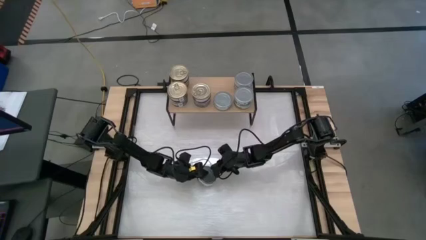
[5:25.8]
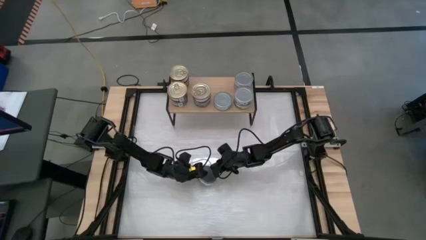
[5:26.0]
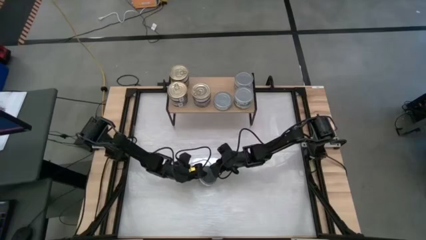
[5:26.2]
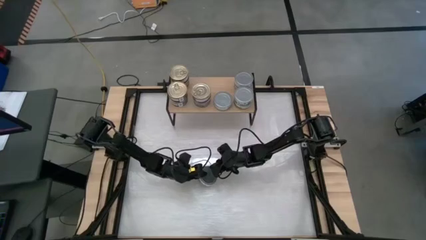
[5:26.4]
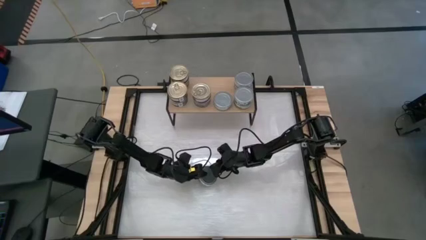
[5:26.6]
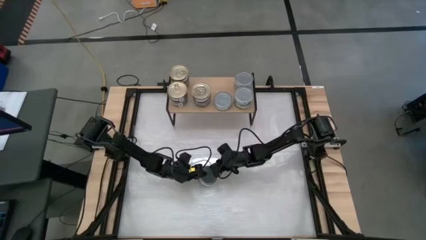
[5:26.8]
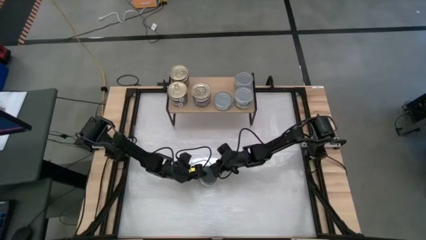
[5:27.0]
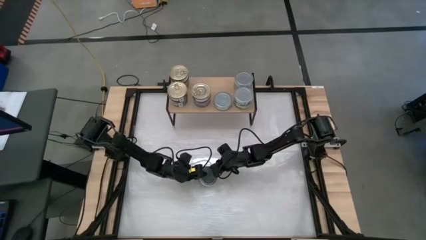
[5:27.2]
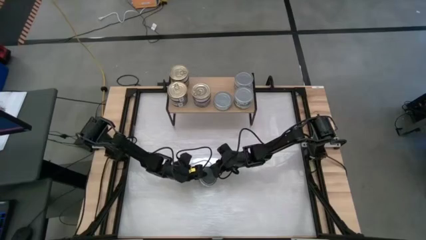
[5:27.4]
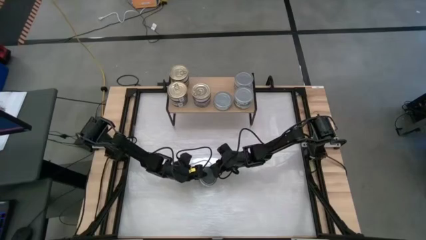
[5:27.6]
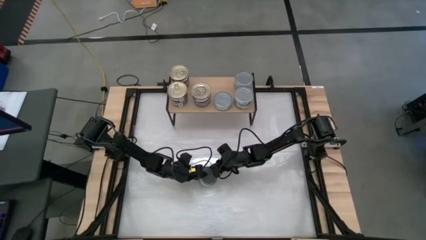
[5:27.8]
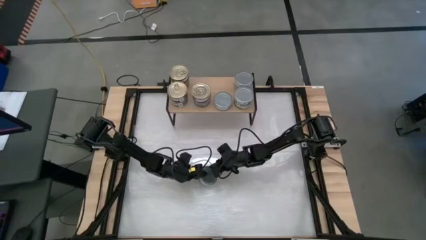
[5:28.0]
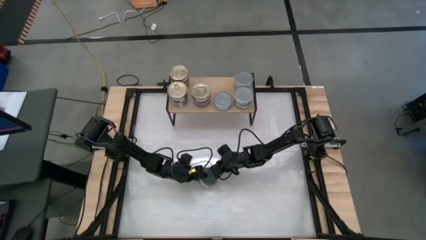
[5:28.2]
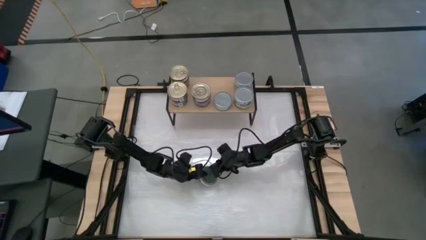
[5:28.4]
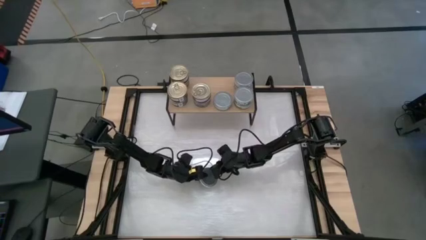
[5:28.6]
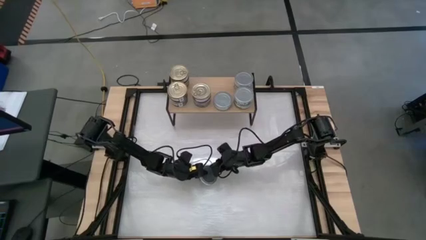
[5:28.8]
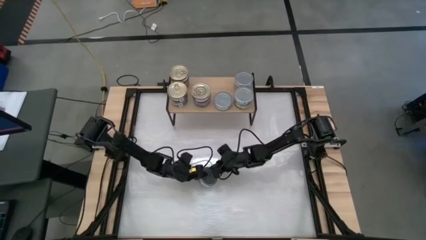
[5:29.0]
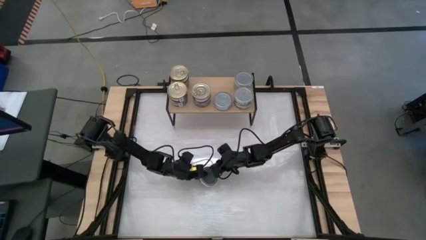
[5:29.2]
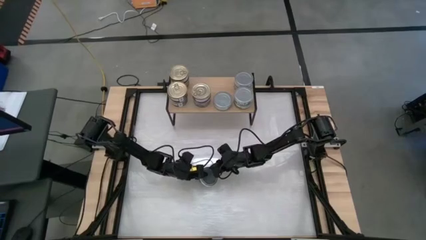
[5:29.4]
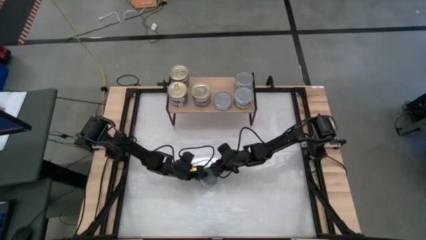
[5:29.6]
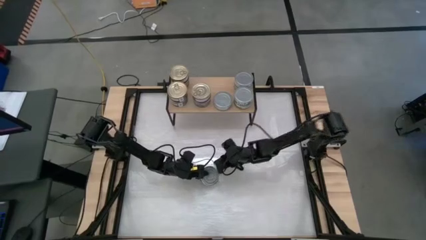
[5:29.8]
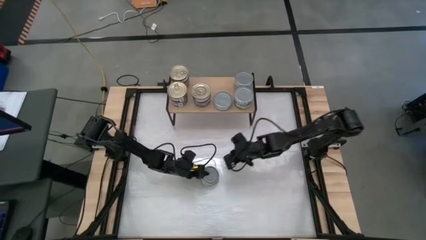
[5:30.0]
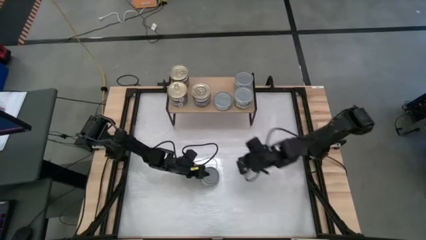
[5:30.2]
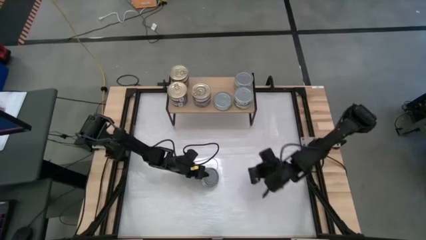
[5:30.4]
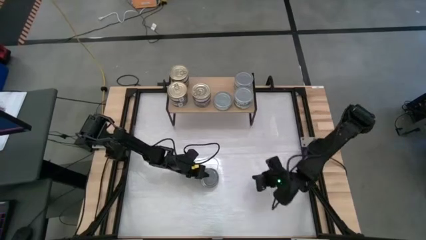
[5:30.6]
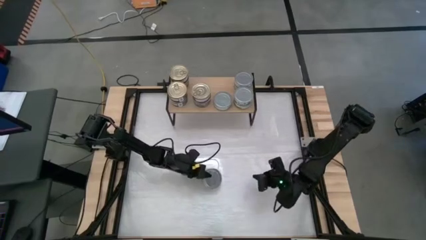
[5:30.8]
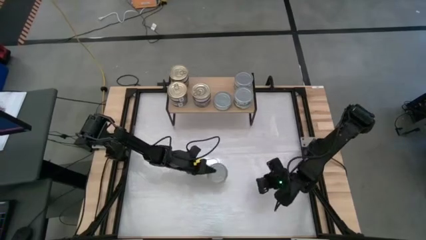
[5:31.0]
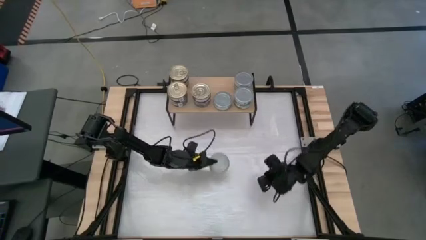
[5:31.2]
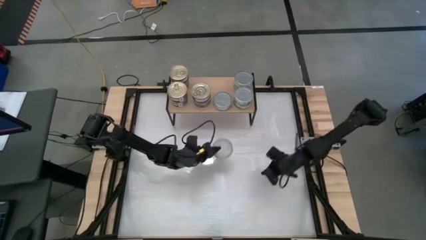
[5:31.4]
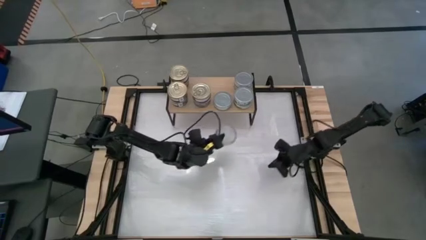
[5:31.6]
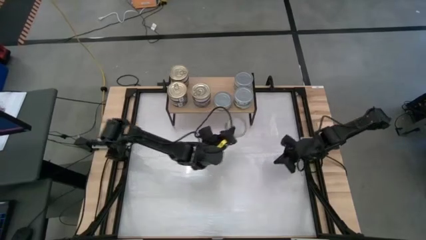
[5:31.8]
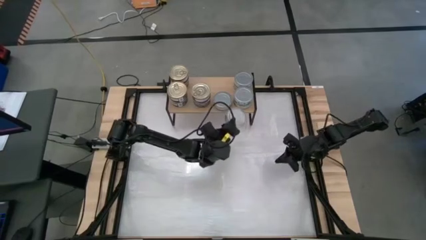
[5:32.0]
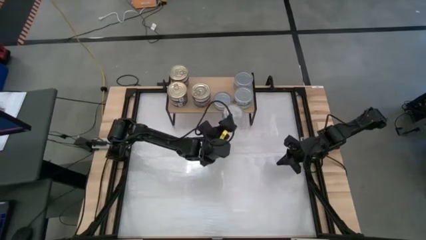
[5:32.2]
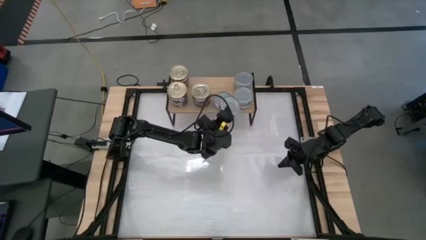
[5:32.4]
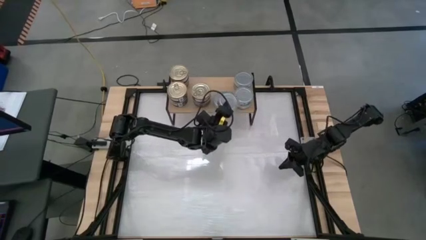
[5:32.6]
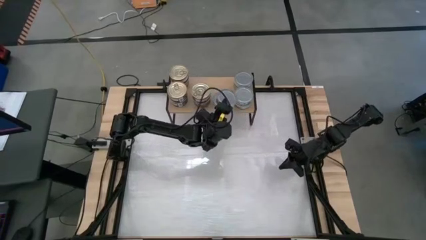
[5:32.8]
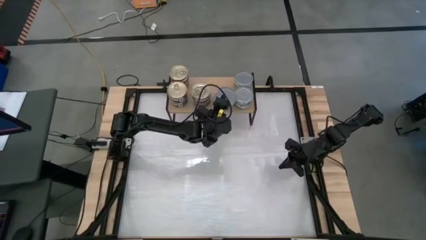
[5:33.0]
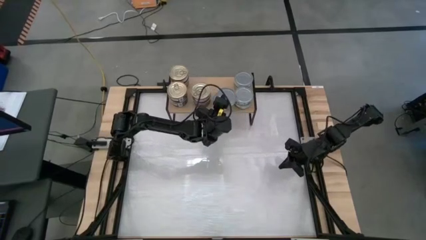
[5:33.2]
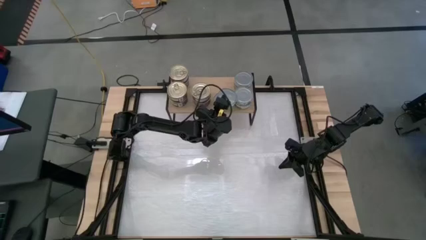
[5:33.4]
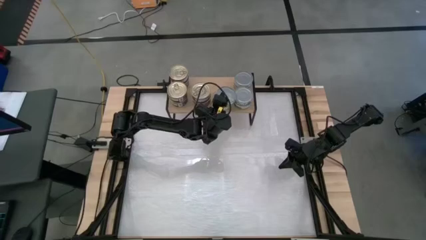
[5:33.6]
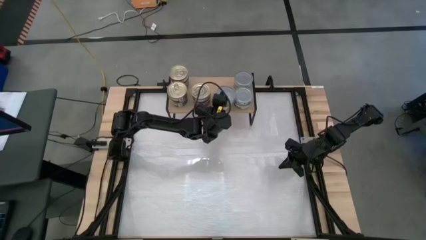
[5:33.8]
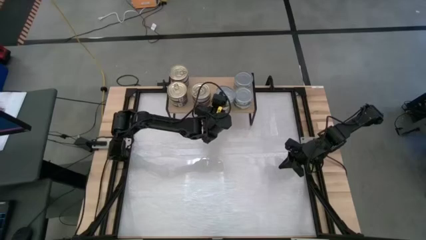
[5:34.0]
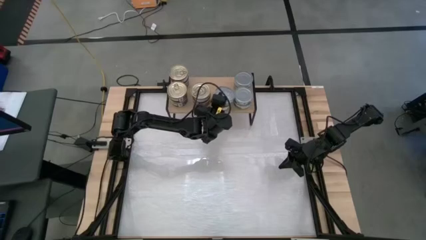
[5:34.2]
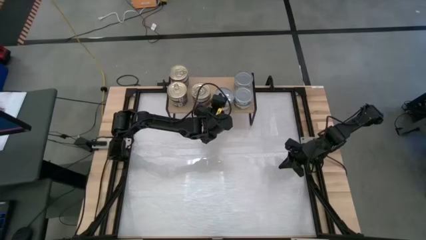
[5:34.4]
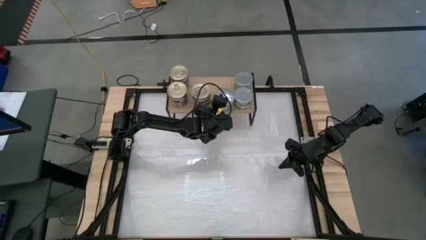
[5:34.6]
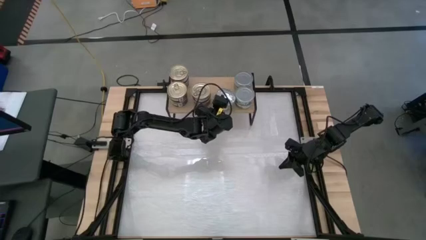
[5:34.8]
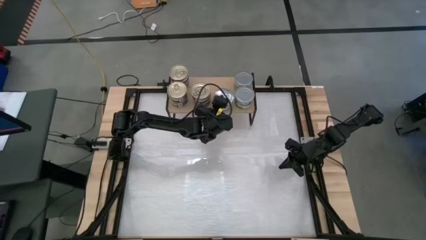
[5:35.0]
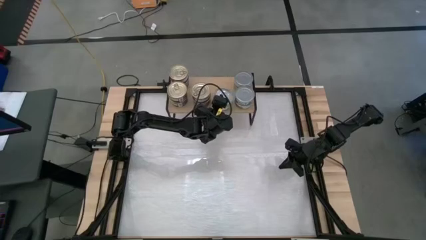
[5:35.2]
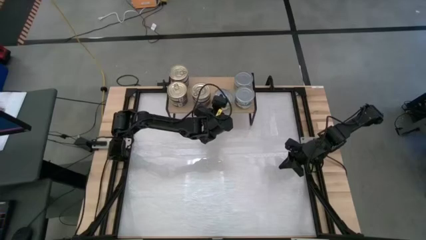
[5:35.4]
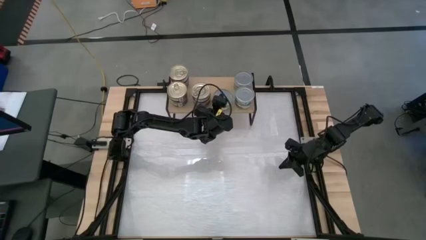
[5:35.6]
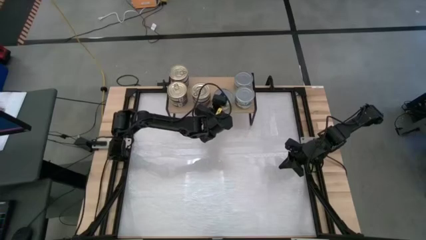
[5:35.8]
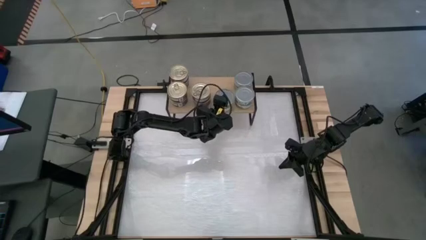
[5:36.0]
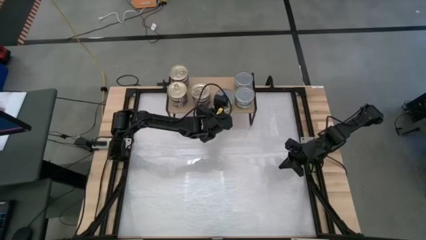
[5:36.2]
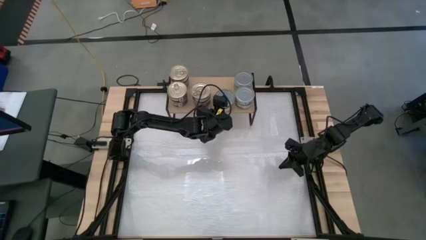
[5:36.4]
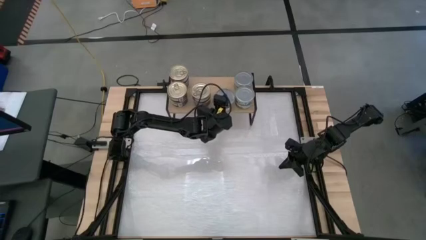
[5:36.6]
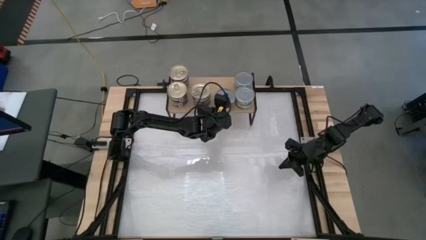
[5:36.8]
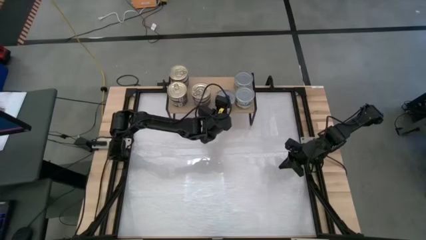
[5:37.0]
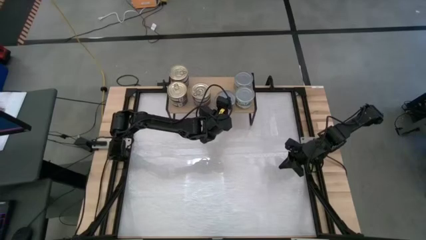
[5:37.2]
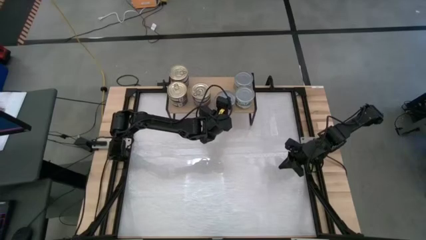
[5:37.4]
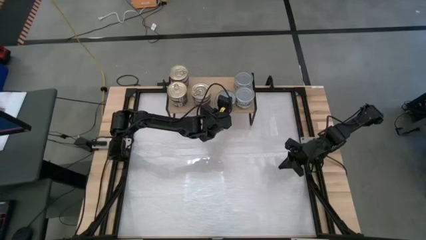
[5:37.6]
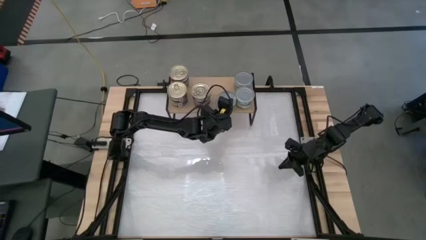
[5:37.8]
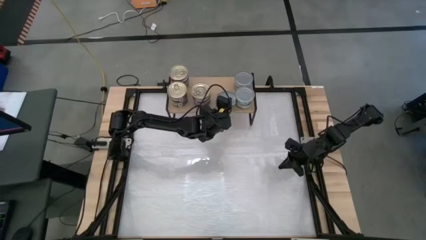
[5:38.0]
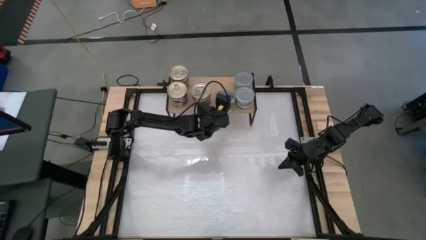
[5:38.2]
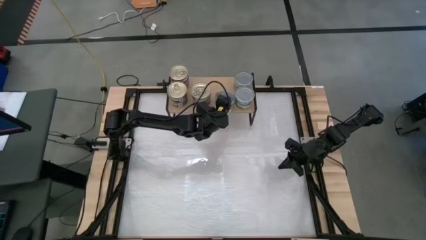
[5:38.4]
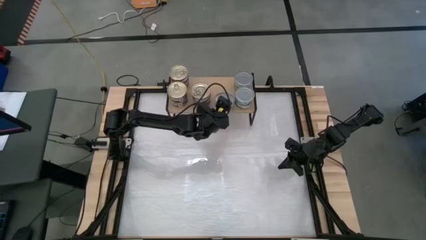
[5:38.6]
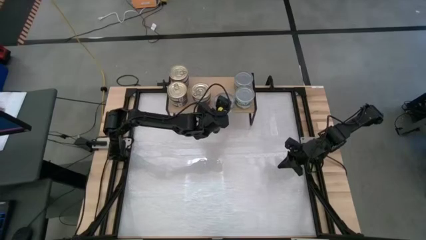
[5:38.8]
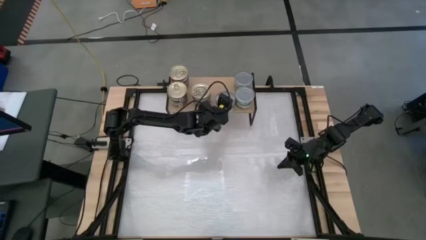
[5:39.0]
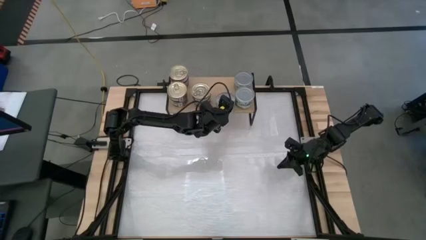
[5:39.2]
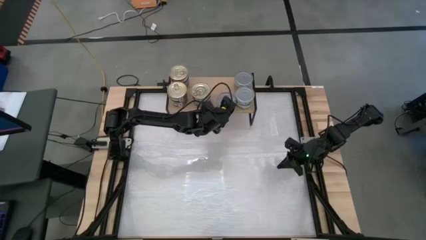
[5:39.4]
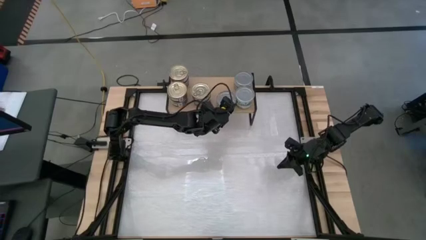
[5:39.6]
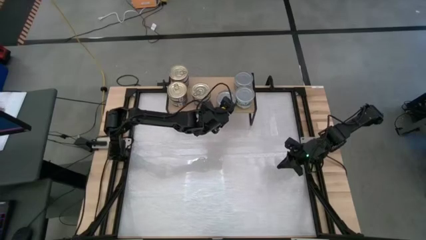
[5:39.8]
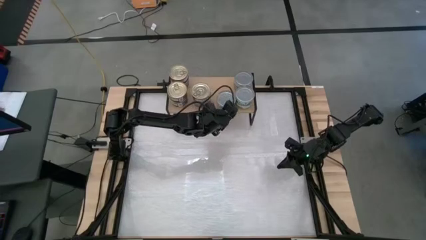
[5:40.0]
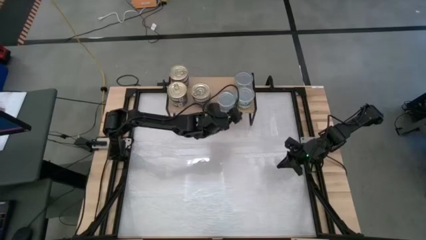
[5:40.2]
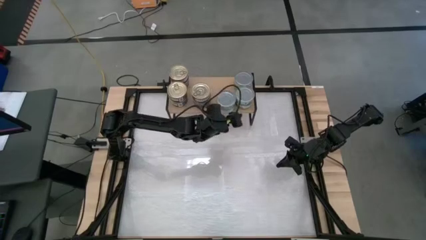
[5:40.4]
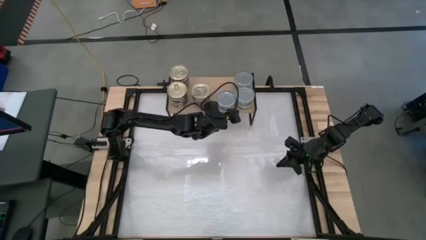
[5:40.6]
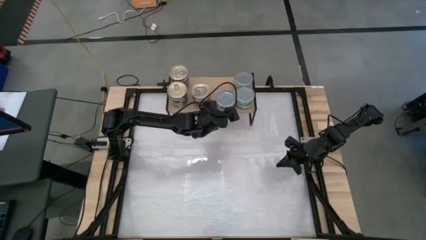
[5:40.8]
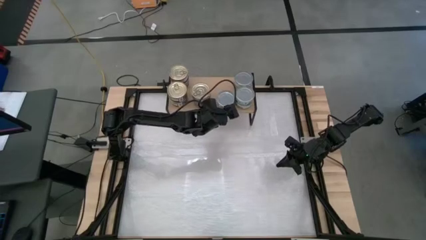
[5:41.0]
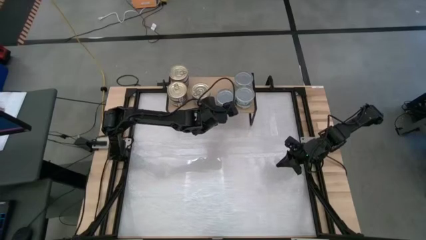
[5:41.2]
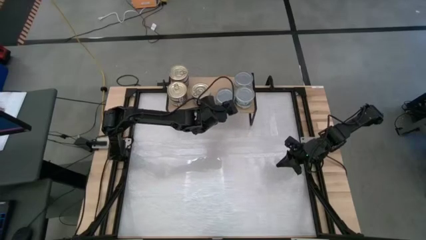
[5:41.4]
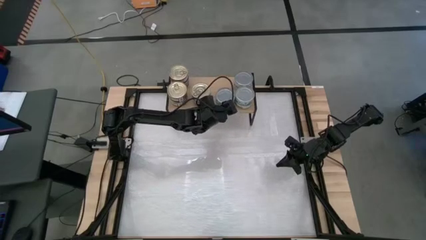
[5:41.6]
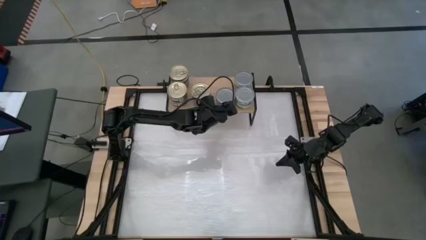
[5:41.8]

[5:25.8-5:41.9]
Task: Stack canned seafood by type on shelf
Stack the green white tuna can on top of the other green white tuna can on the shelf

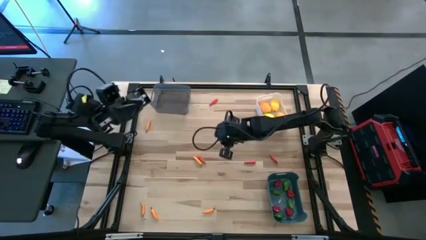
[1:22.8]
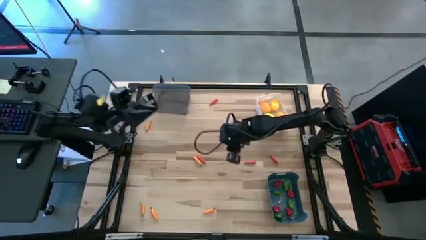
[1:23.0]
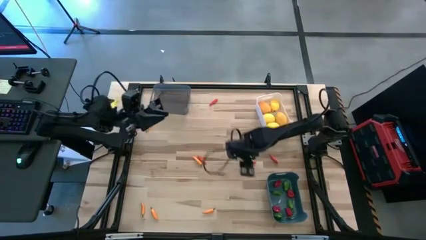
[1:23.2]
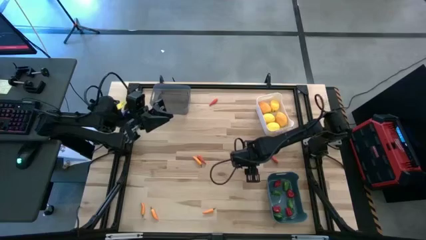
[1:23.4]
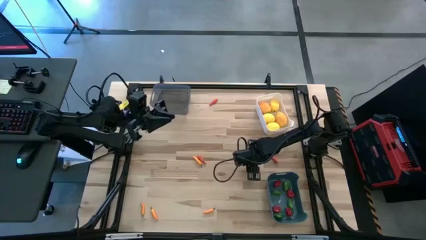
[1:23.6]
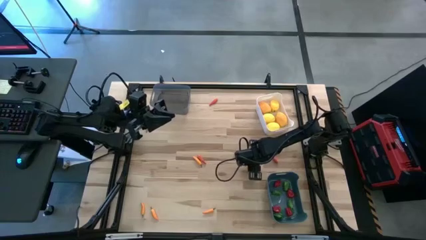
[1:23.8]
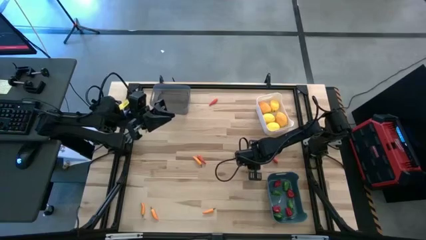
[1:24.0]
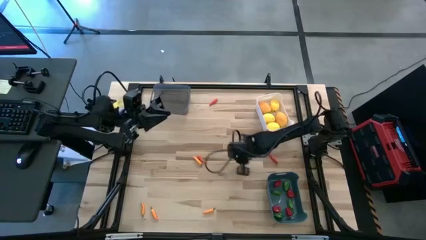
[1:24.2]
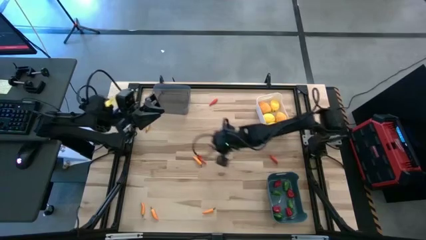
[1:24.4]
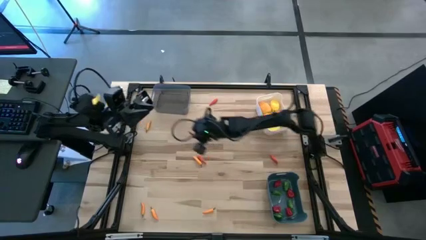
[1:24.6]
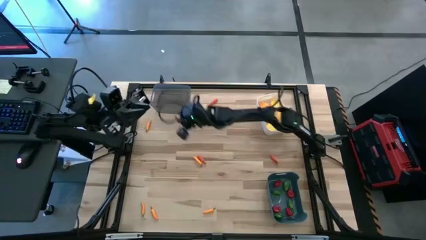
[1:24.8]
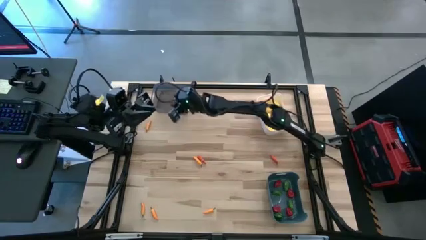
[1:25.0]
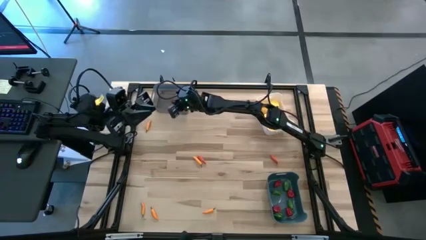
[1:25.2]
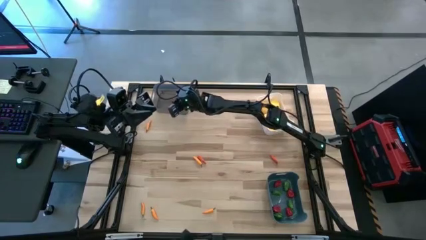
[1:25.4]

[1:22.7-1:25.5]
Task: Sort produce into baskets
Put the orange chili pepper into the black bin
